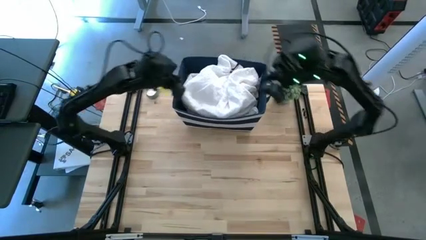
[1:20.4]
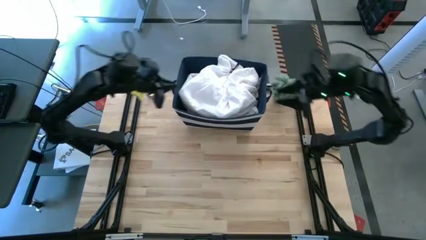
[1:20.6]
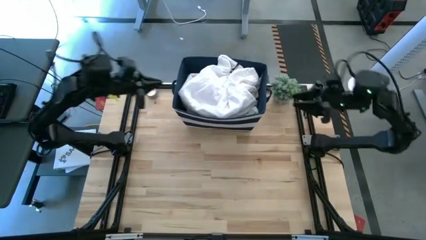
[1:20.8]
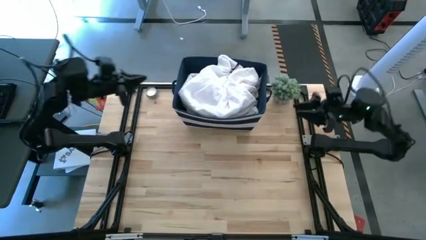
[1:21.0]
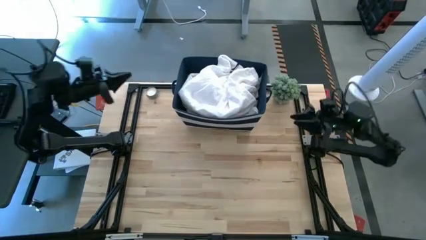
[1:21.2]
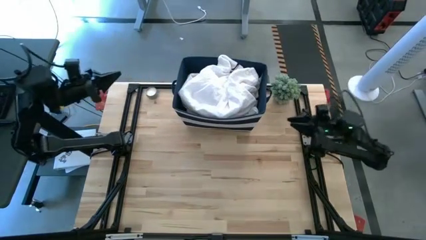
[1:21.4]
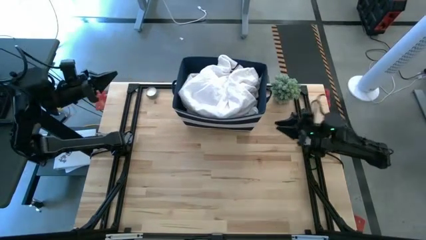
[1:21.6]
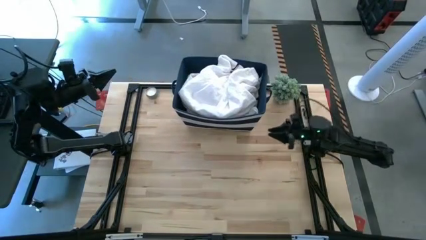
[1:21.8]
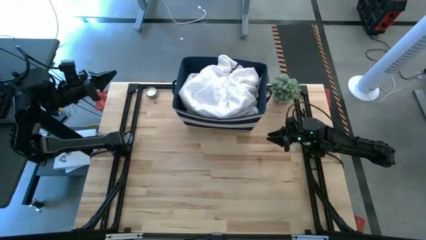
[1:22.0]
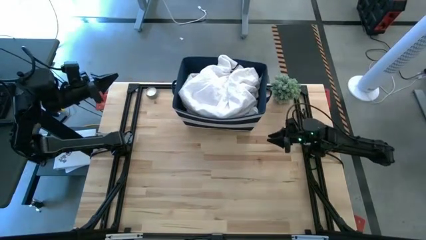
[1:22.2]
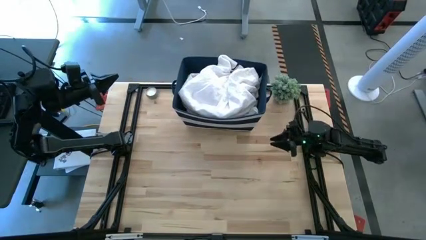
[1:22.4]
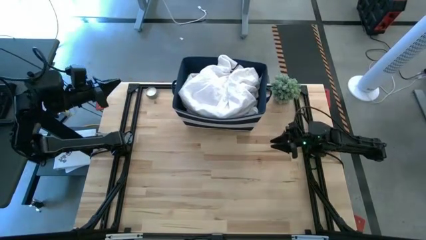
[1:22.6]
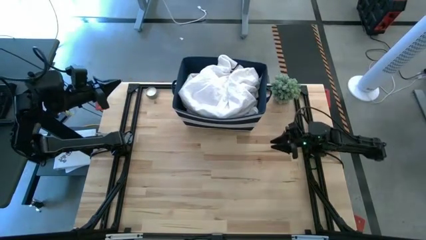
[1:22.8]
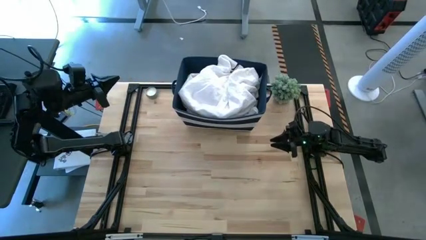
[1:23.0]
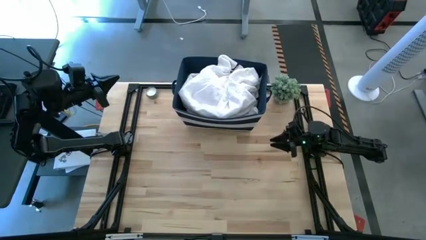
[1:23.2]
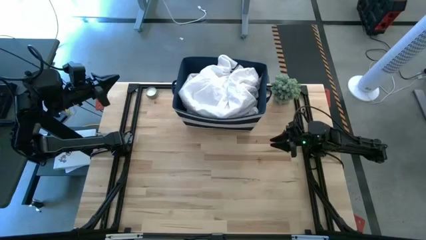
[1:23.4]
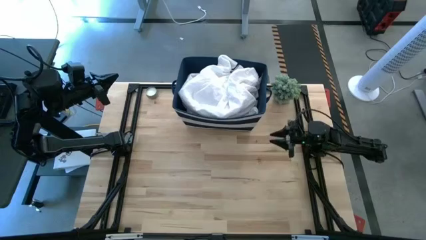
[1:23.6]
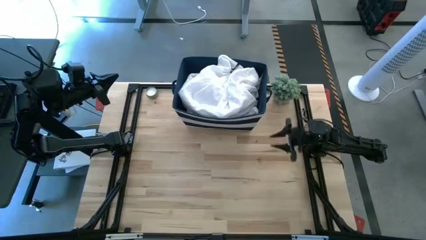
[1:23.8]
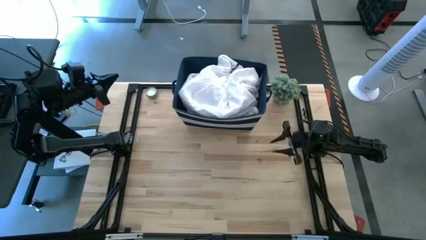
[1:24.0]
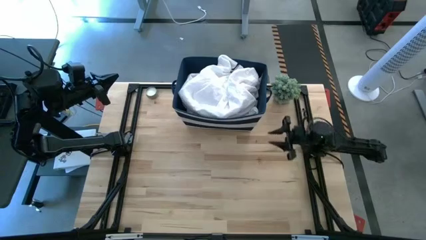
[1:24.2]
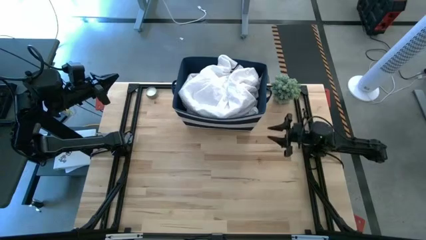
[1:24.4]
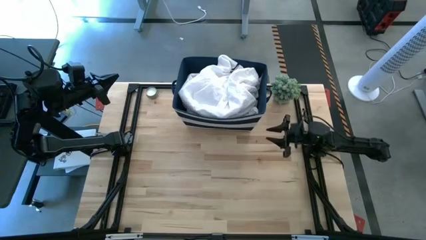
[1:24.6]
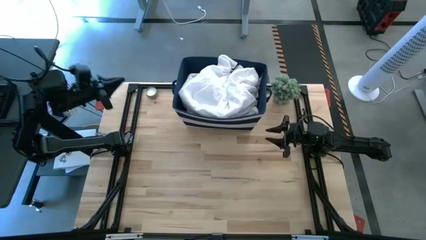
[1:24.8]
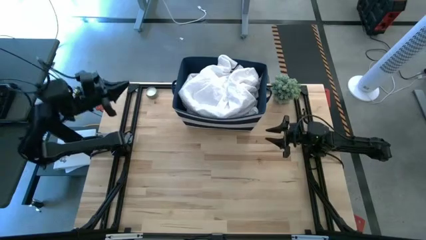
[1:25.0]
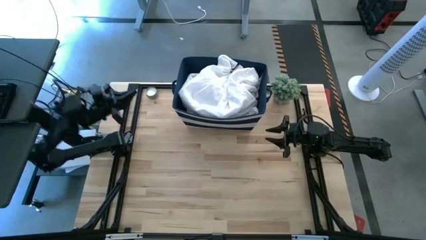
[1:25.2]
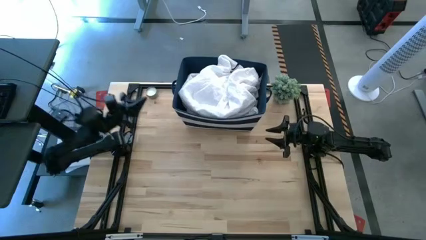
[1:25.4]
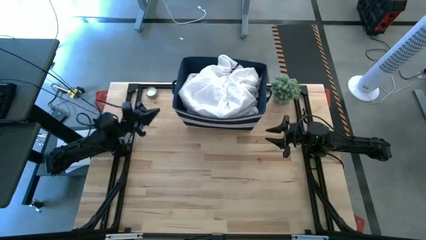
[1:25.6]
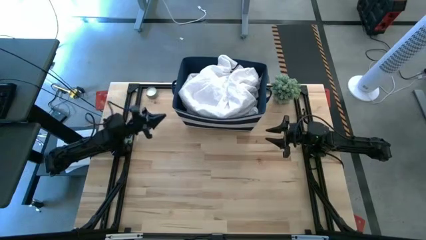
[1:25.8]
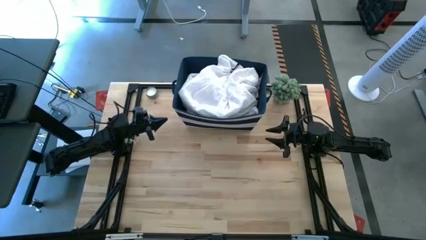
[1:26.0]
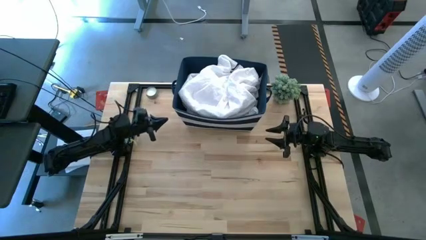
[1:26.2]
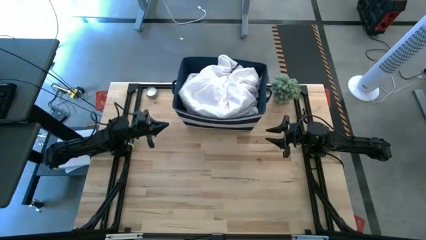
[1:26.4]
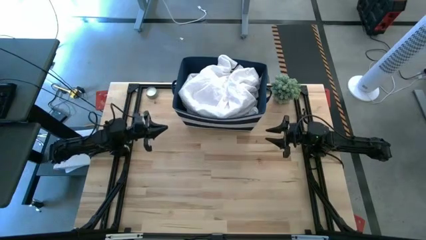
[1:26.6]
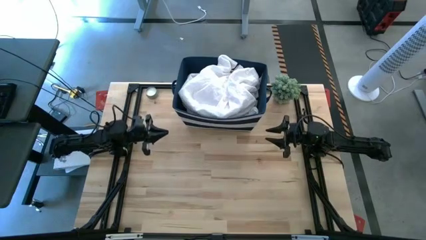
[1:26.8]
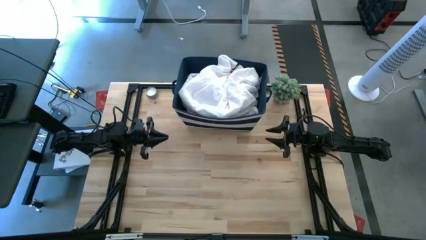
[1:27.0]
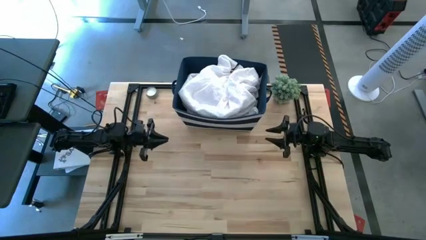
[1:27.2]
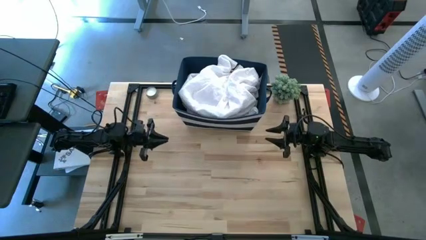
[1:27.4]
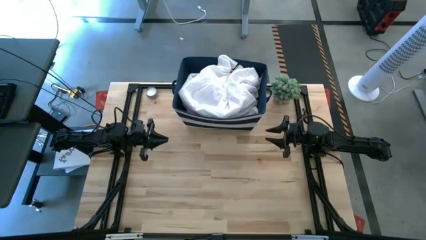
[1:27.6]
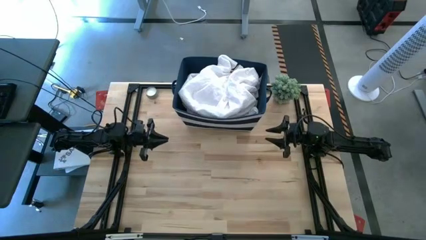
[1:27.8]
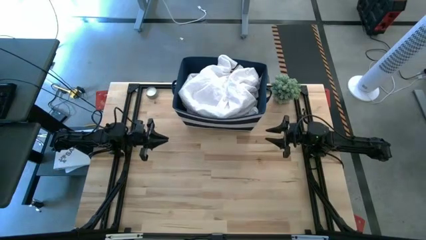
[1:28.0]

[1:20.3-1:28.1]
Task: Sort clothes
Return to Home Position

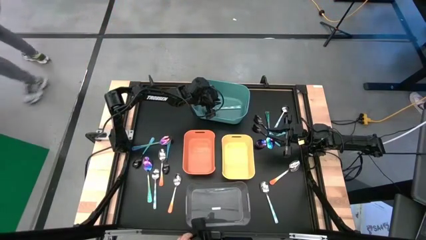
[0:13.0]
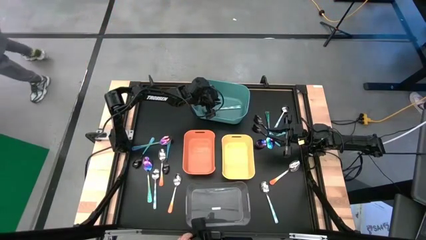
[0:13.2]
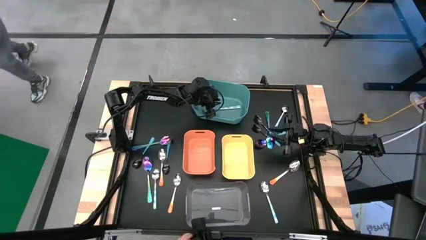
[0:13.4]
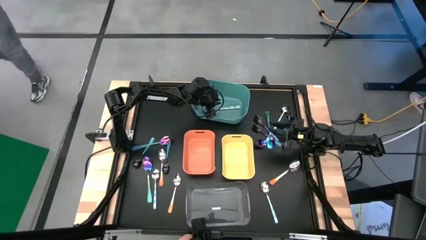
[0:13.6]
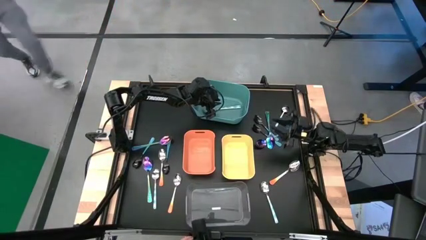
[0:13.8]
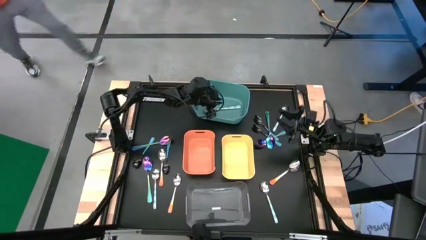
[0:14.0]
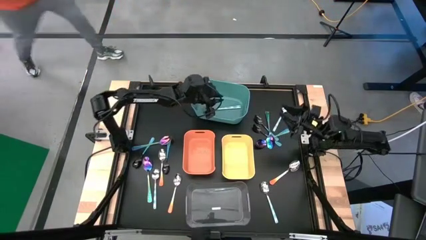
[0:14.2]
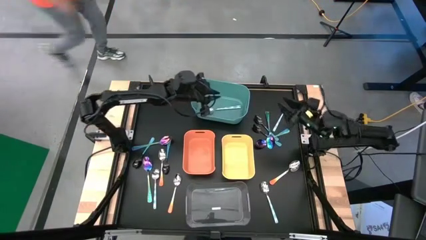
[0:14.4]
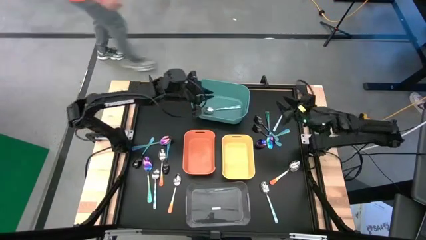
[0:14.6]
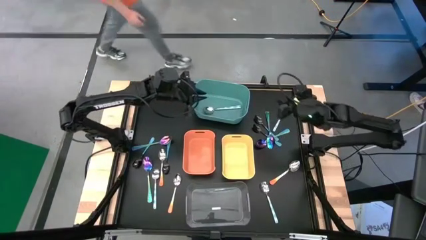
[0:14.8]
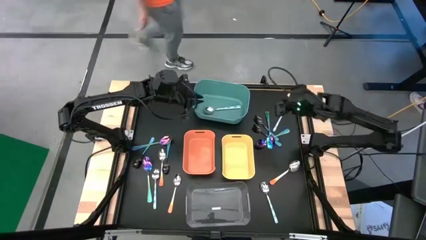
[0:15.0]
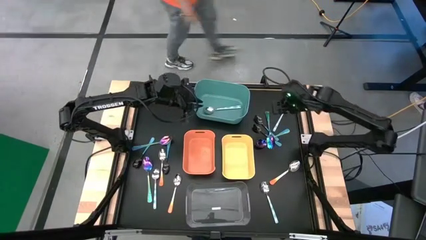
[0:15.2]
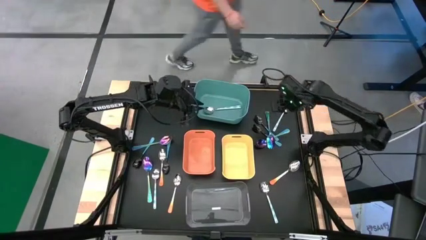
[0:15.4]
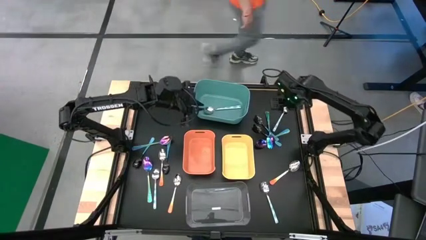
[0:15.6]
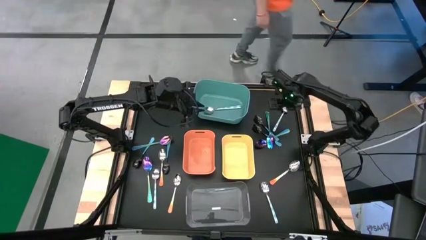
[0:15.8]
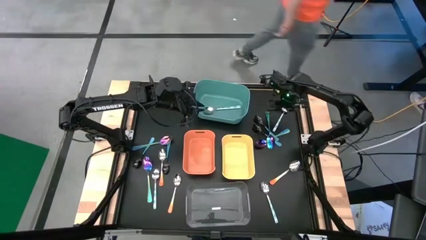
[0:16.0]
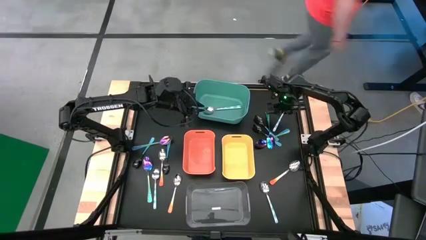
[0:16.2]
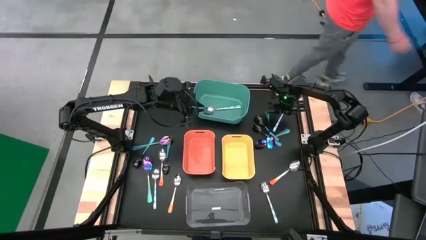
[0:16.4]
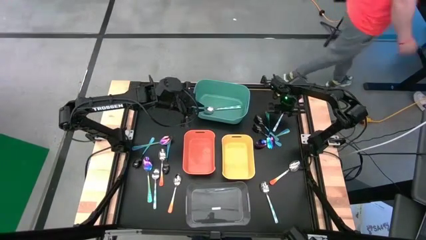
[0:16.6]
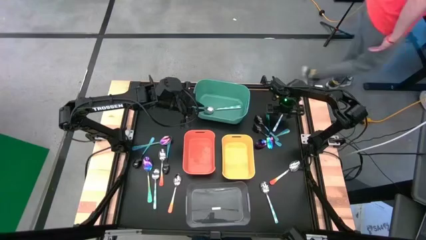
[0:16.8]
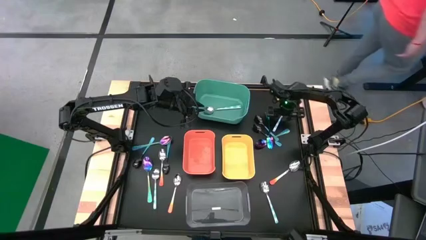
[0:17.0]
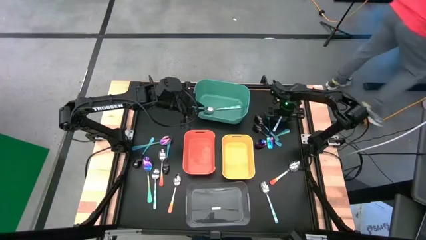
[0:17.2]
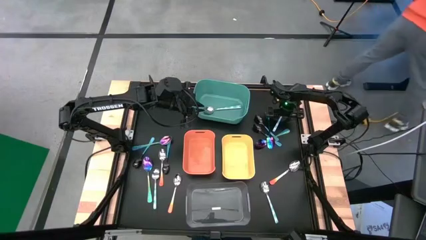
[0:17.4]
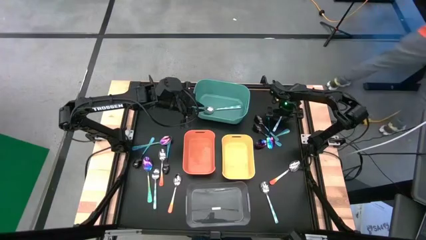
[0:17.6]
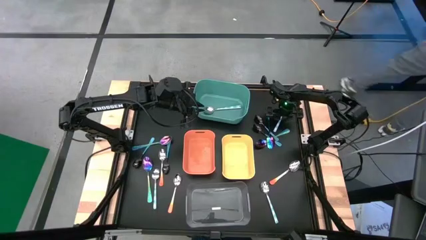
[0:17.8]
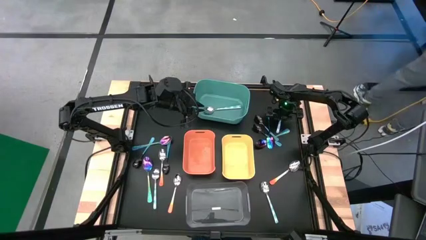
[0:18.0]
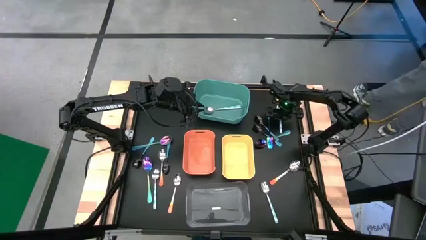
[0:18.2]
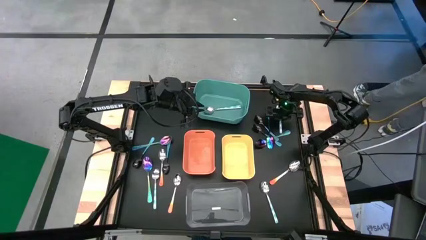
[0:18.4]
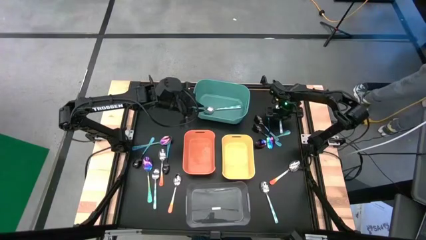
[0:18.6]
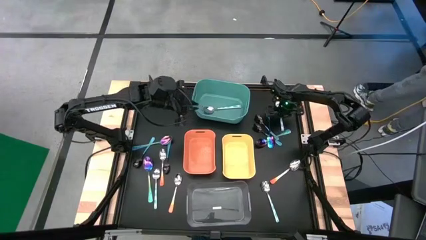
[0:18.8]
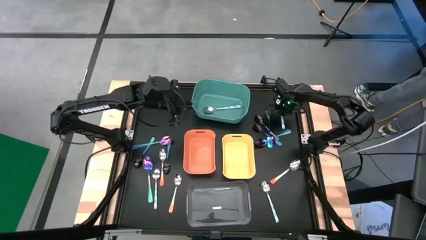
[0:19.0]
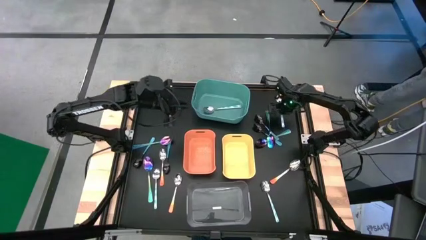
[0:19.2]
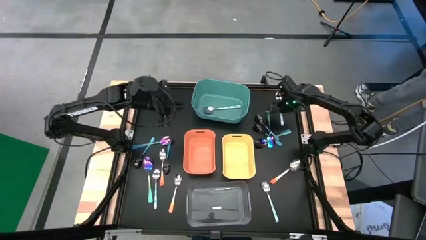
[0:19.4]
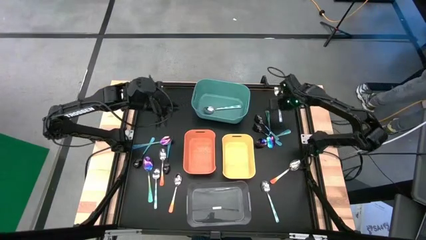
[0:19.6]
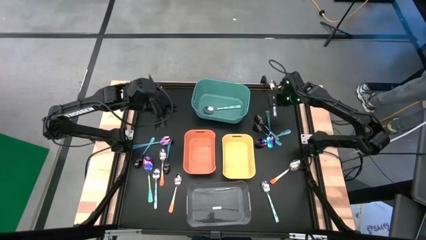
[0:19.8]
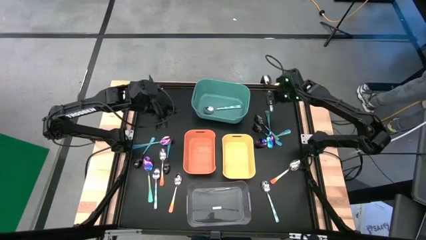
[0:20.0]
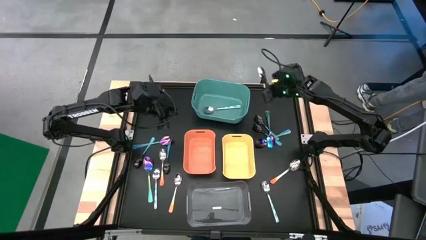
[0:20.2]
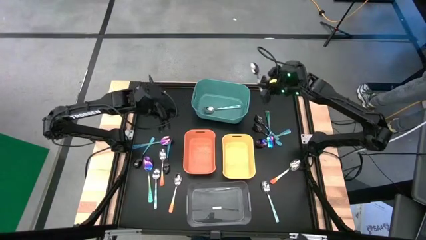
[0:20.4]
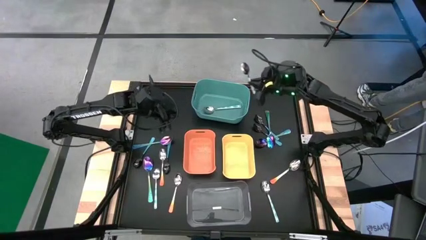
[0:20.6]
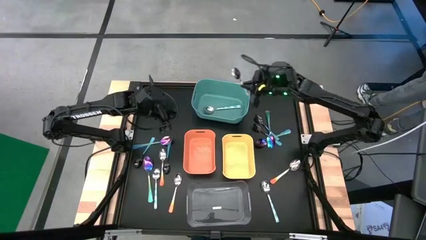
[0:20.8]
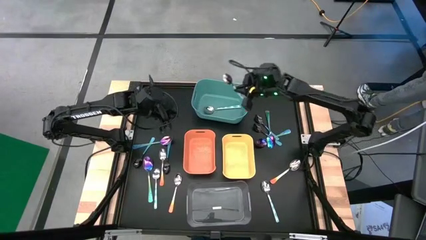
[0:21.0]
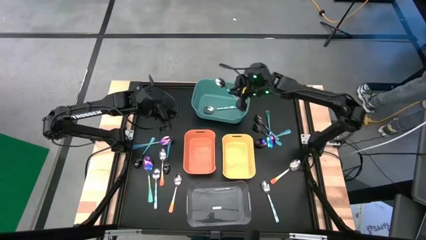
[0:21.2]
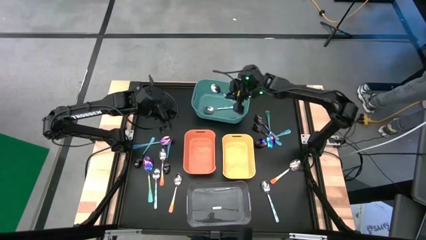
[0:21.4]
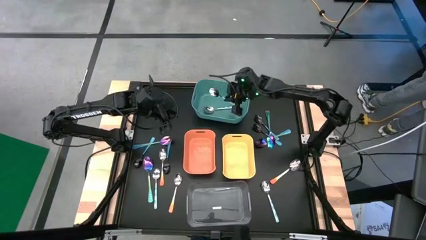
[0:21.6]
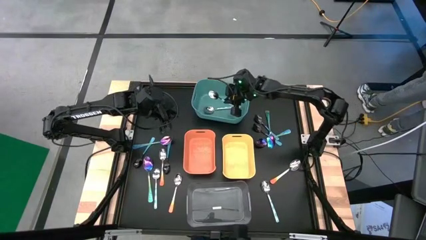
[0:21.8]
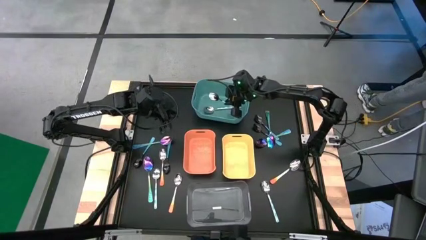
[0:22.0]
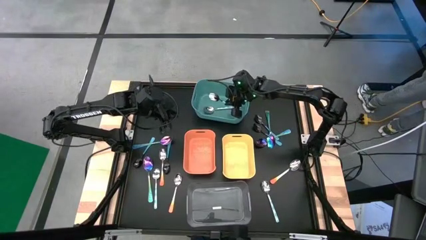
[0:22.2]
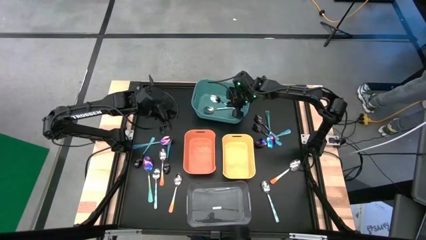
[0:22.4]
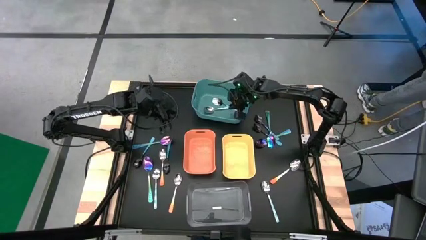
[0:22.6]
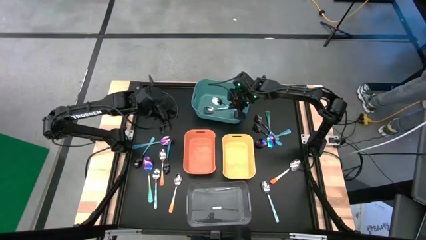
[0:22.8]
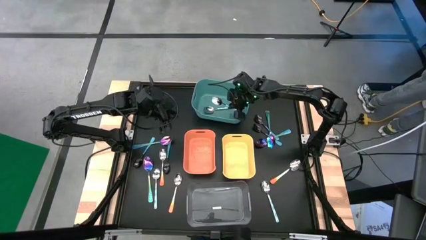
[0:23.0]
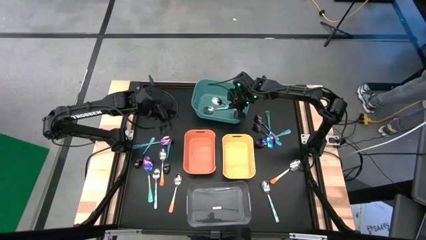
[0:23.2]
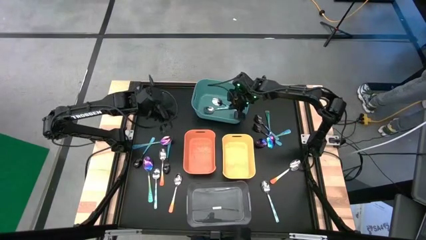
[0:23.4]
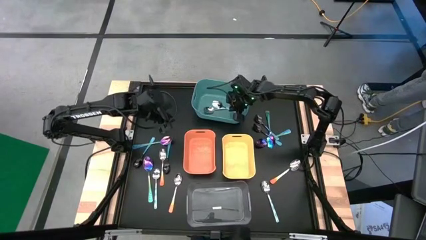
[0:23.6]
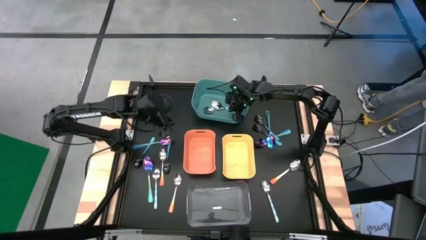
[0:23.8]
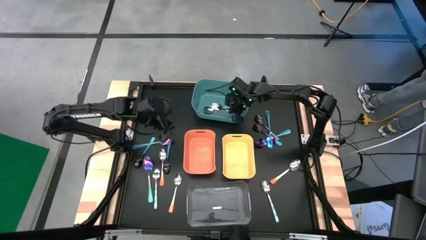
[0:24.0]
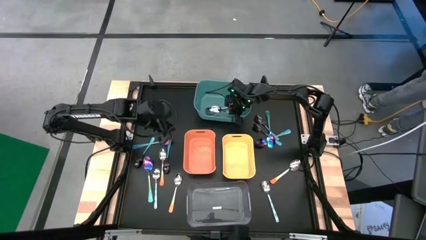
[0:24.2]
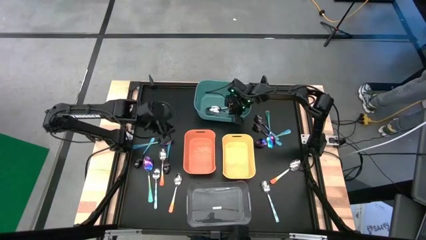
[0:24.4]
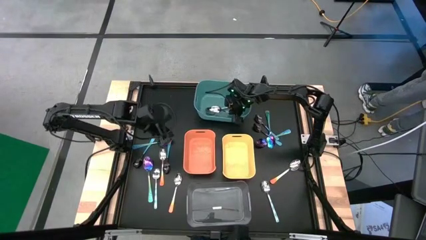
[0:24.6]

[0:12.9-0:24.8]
Task: Sort silverware by color (type)
Put the white patterned spoon into the green bin
